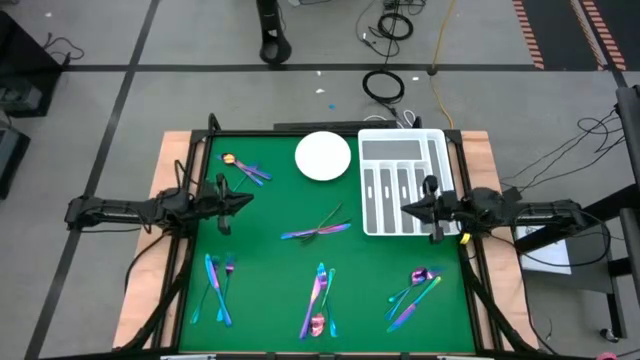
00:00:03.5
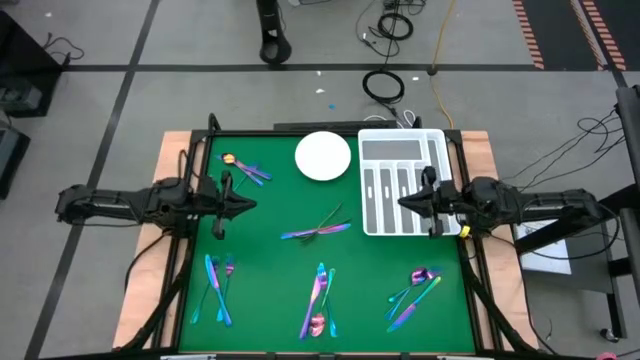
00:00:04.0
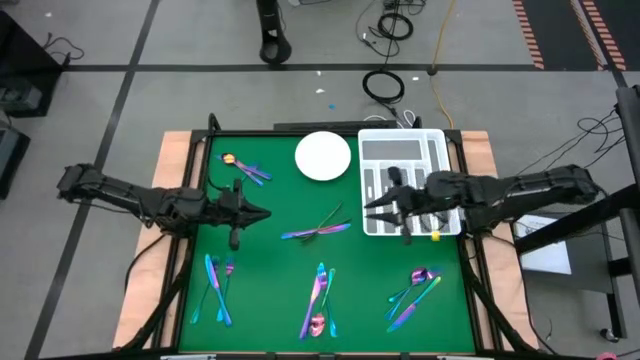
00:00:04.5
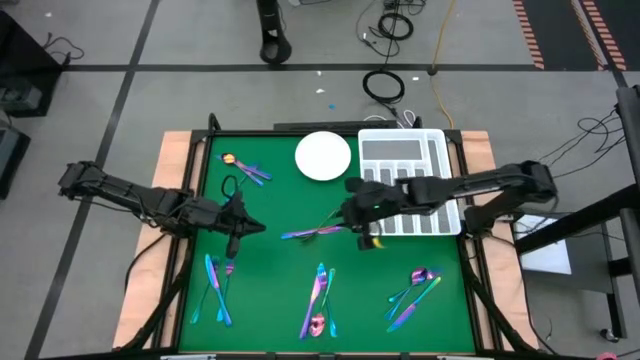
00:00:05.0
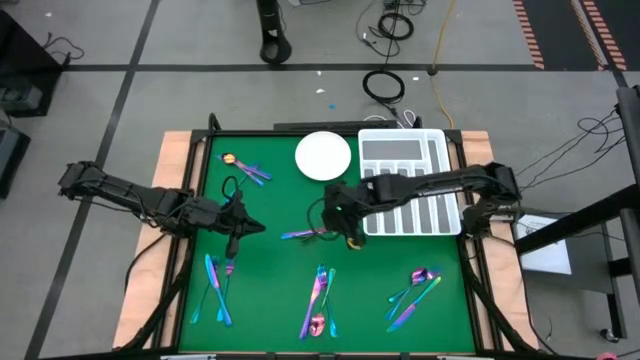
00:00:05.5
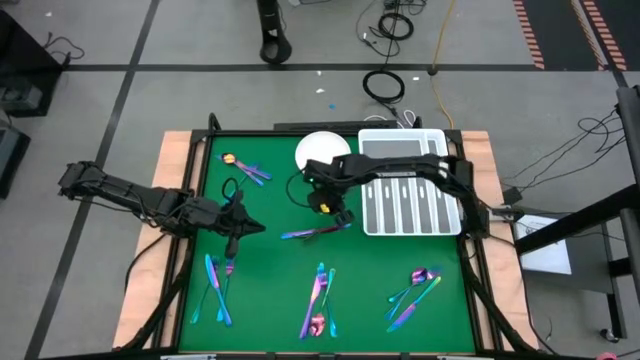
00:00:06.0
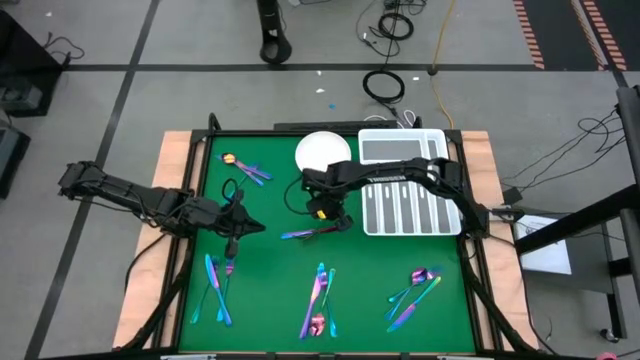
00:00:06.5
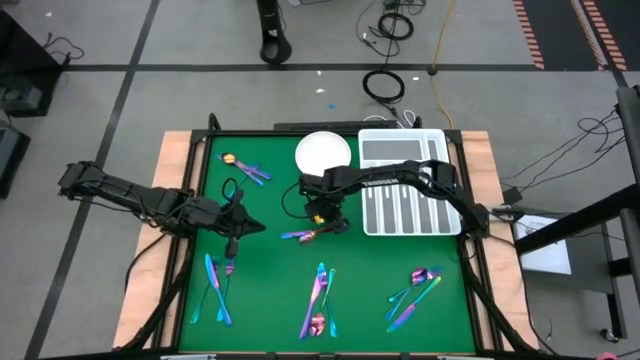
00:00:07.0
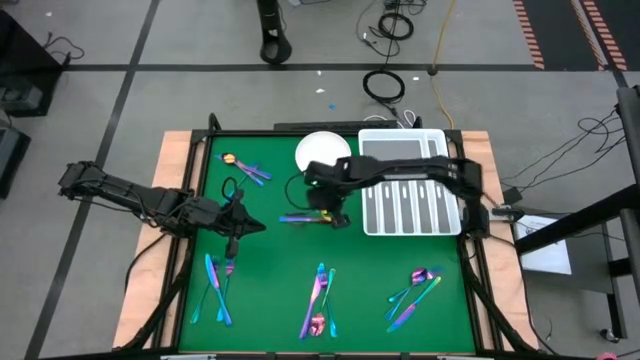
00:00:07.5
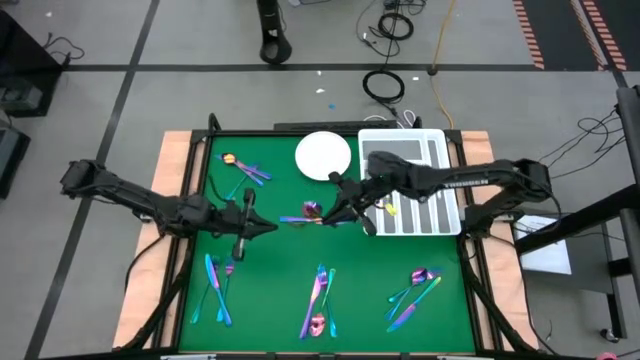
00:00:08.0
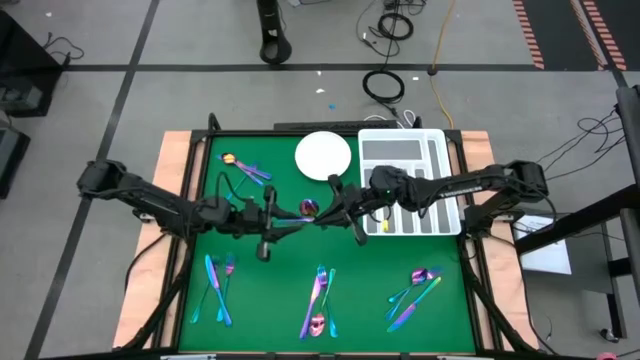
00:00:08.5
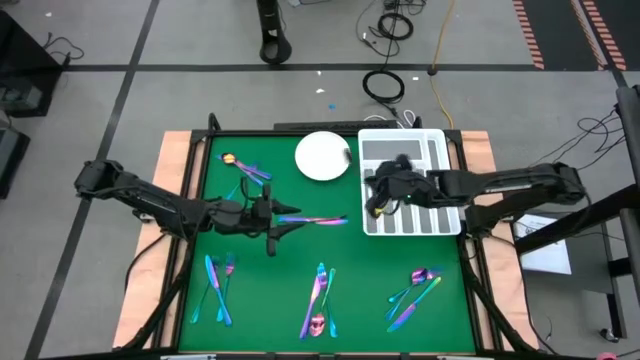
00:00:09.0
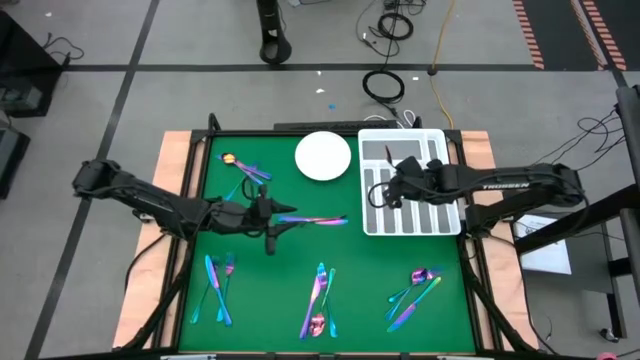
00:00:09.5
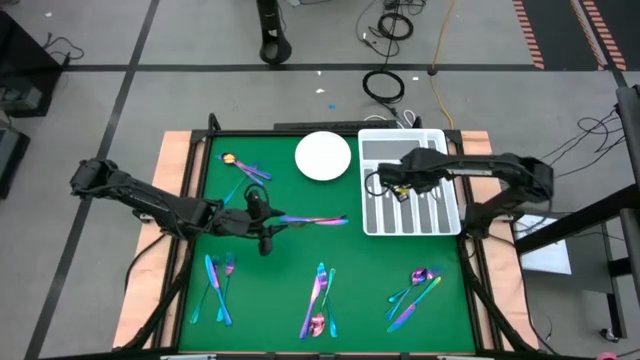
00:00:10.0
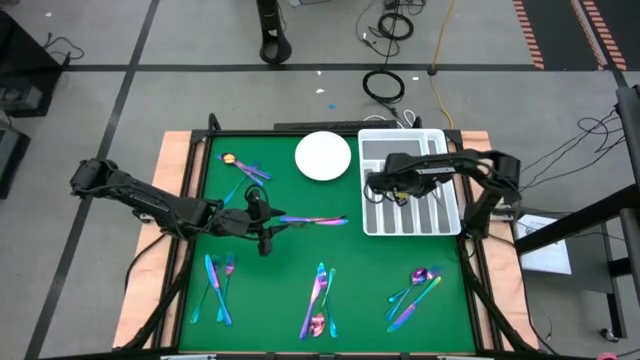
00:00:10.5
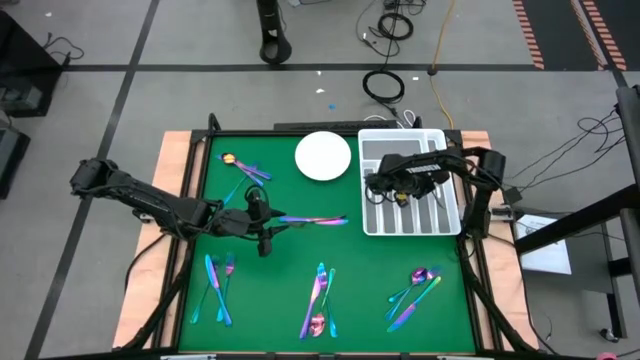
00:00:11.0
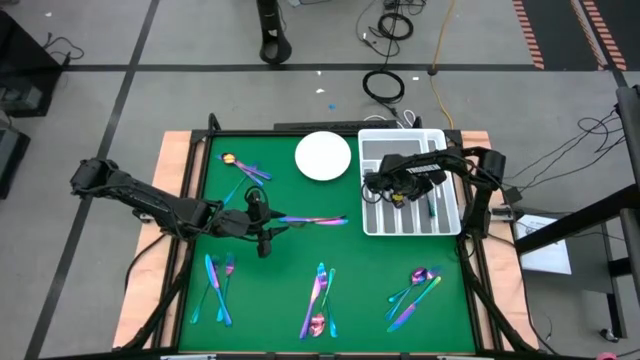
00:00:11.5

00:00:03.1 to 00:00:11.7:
Task: Sort silverware
Put the iridescent spoon into the white silverware tray

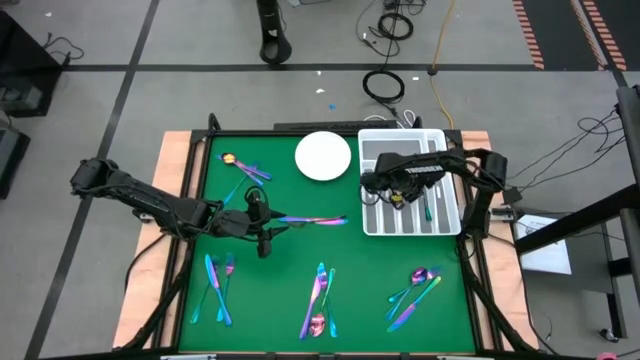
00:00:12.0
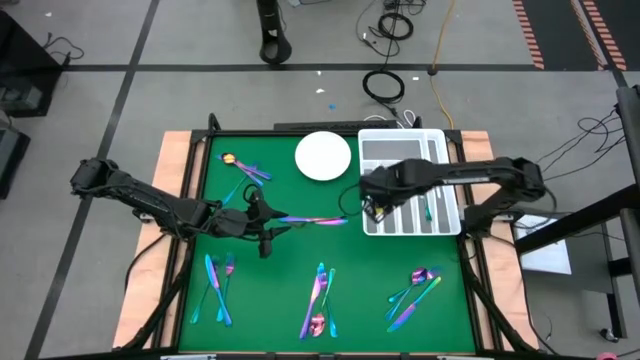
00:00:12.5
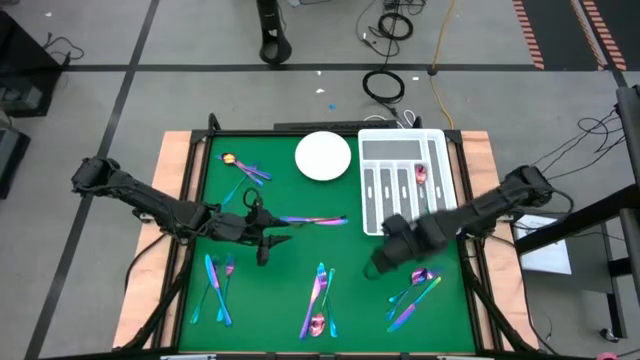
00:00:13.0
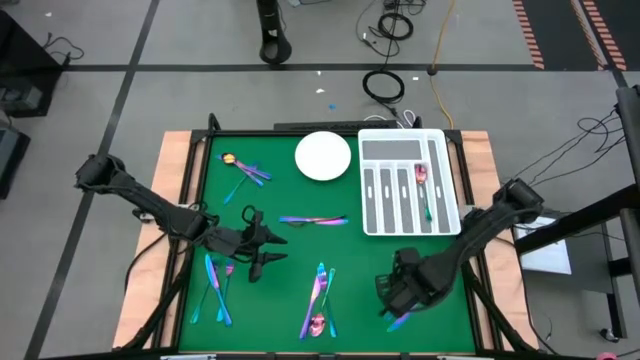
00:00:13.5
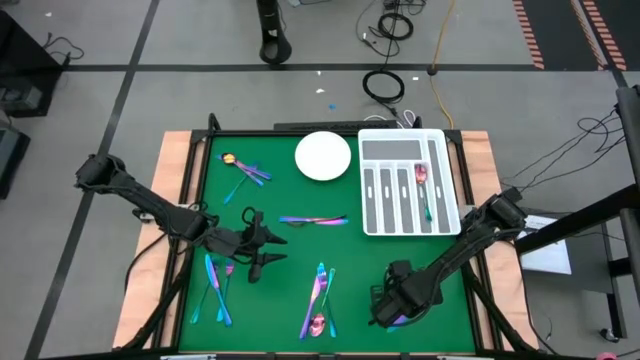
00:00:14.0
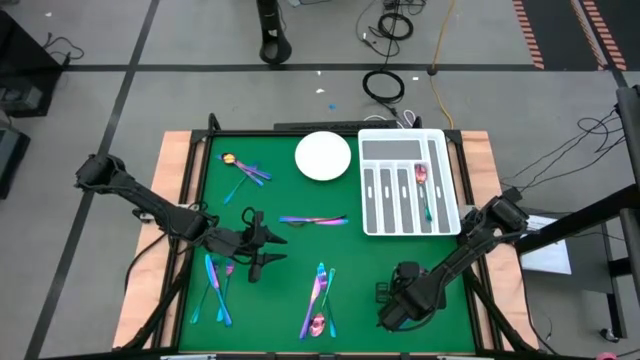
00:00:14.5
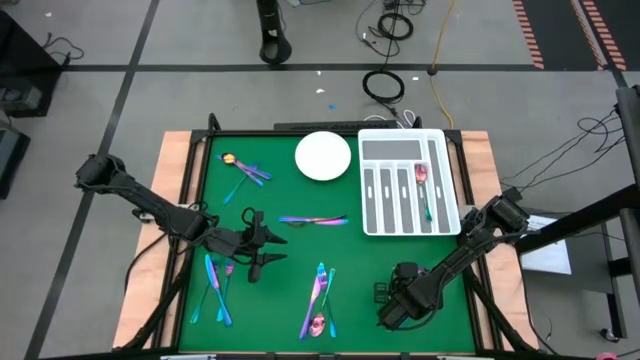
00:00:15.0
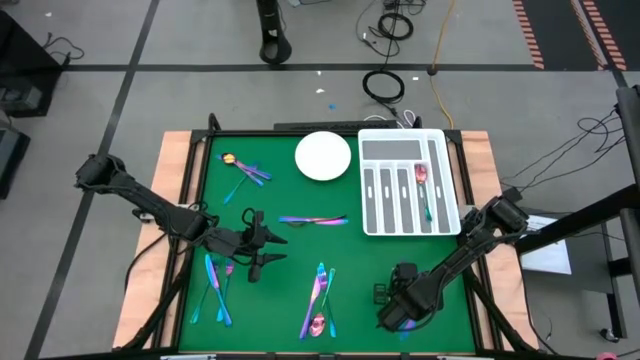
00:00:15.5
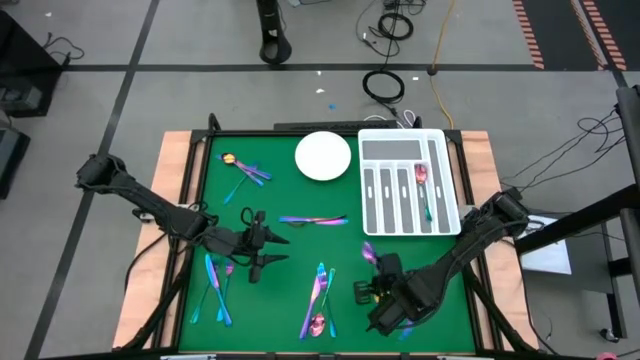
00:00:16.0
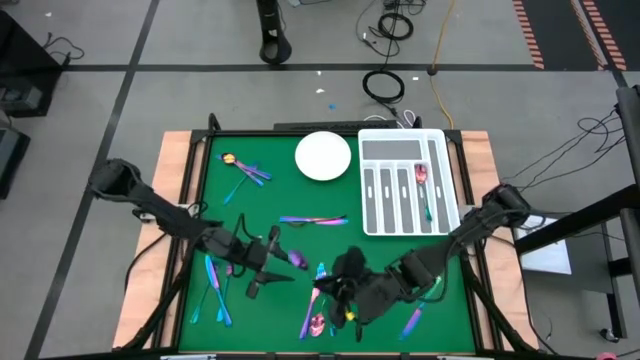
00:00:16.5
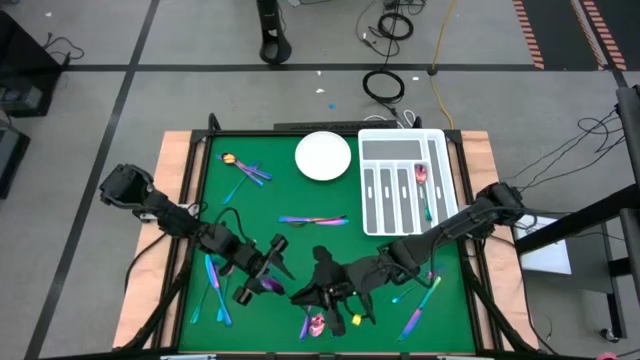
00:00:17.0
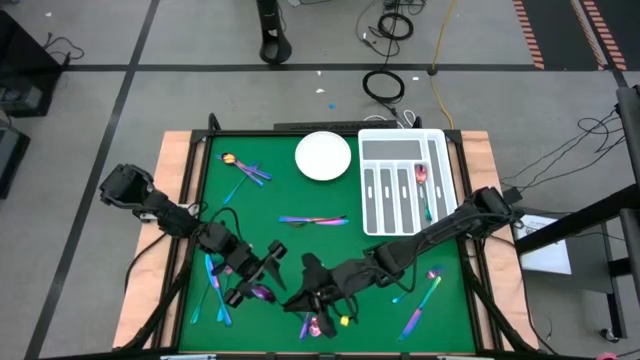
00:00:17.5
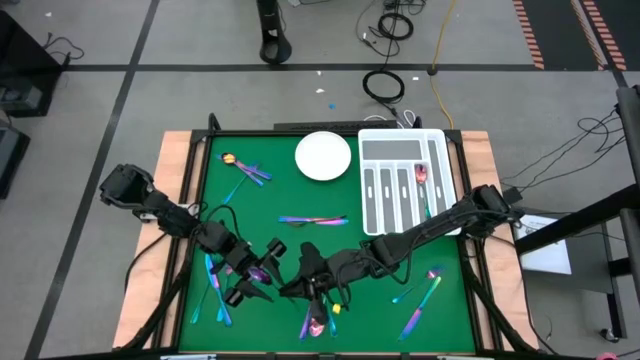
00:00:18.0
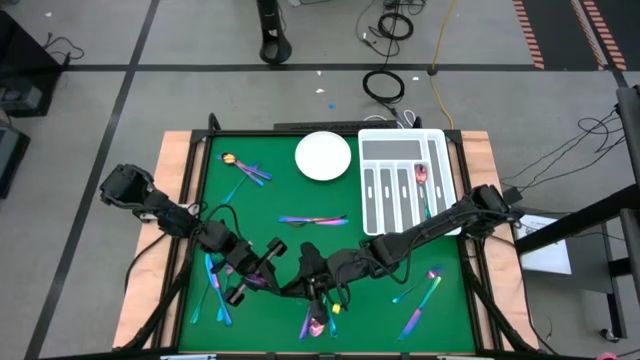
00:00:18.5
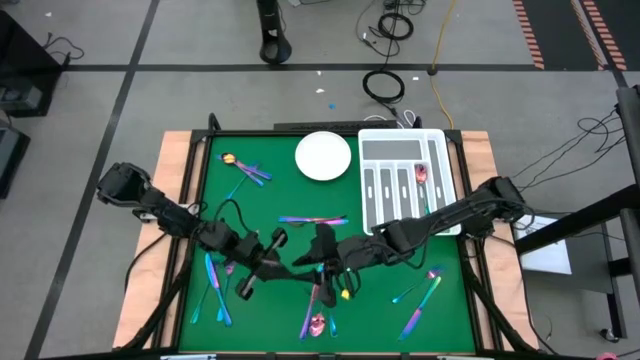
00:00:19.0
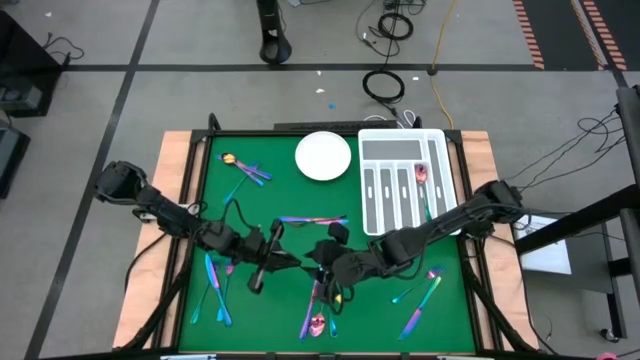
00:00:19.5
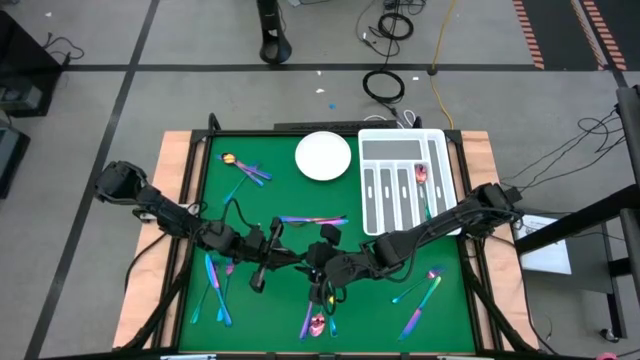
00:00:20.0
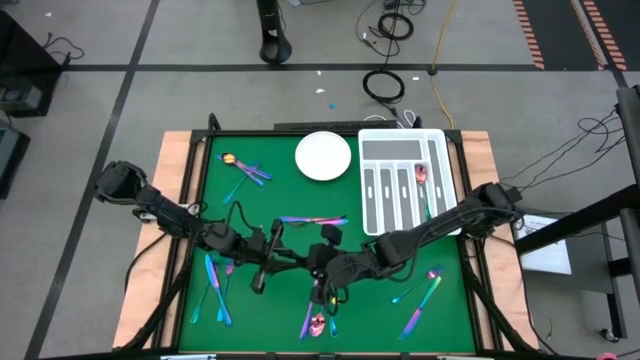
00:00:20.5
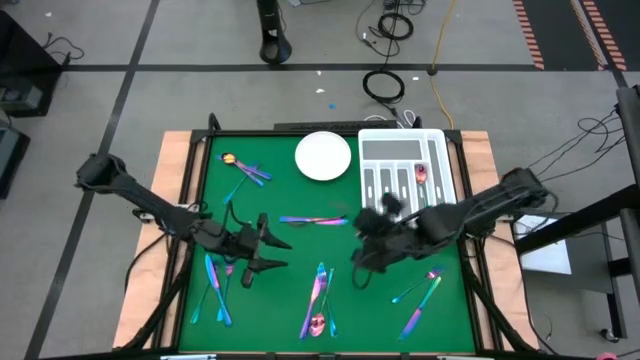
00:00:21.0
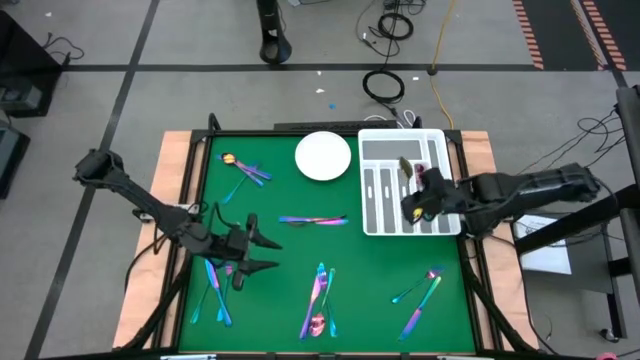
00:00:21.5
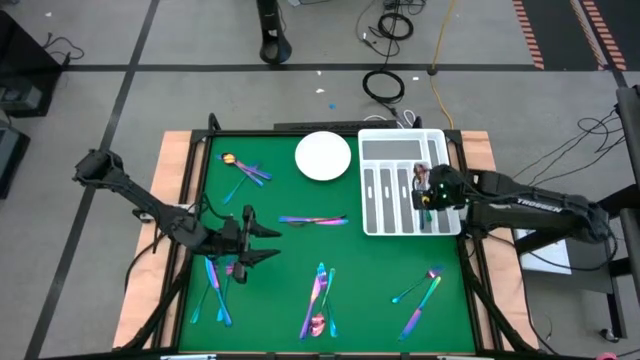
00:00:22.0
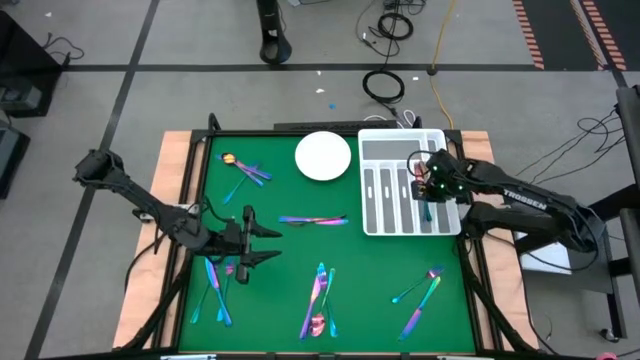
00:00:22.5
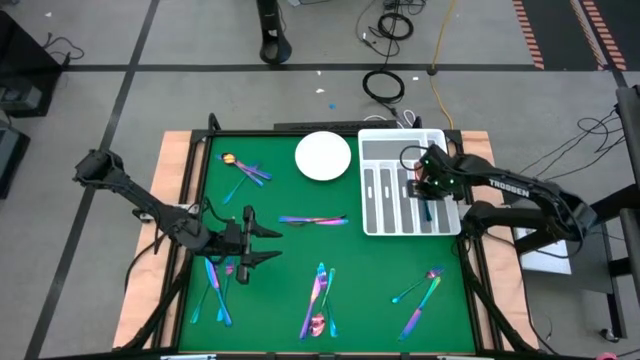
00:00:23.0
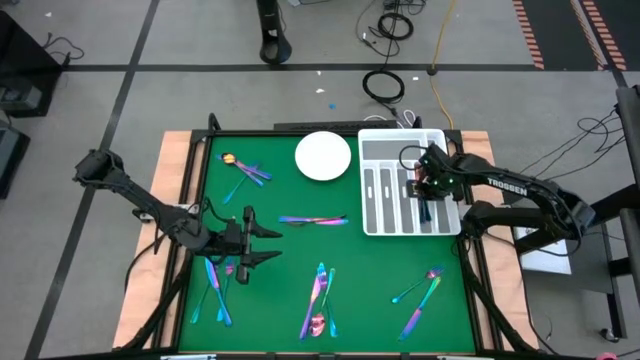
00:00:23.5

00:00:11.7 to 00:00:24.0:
Put the iridescent spoon into the white silverware tray
